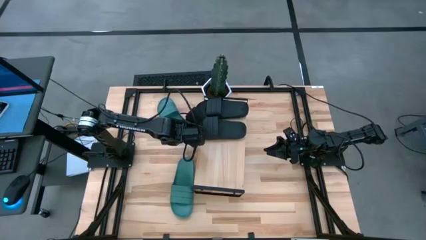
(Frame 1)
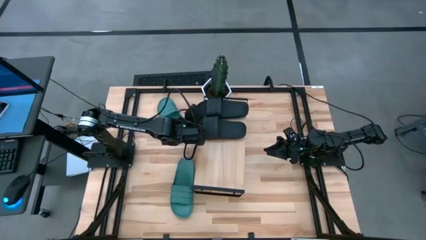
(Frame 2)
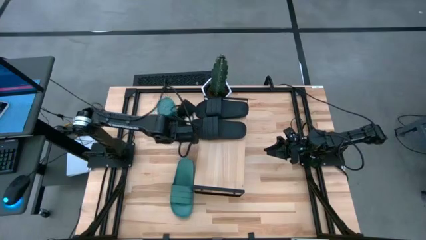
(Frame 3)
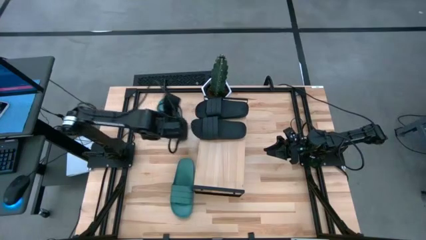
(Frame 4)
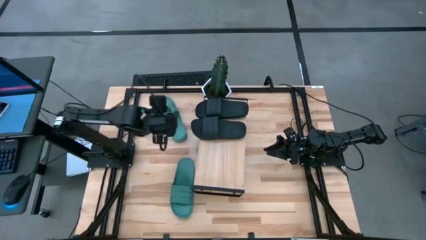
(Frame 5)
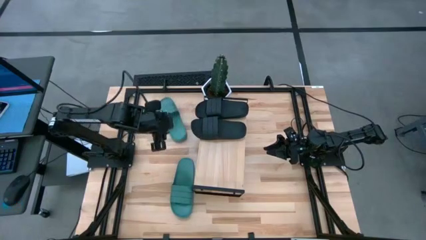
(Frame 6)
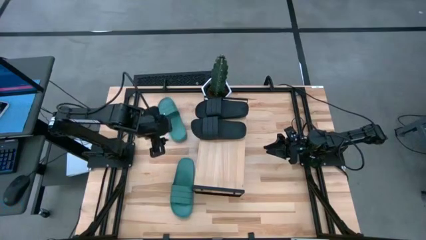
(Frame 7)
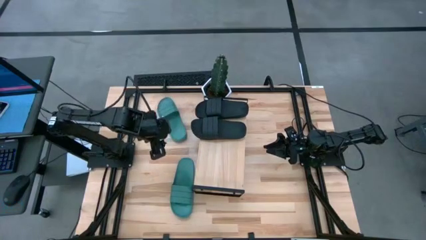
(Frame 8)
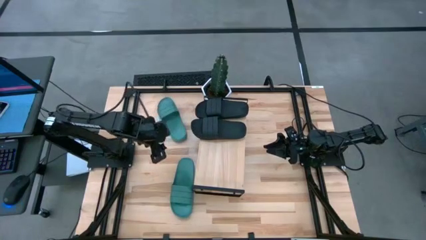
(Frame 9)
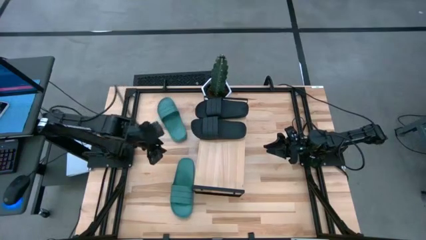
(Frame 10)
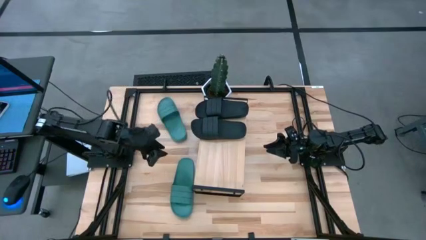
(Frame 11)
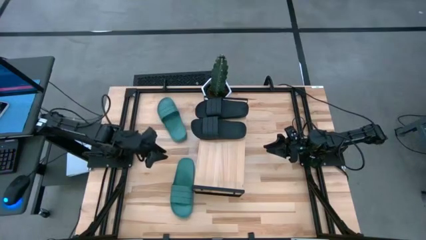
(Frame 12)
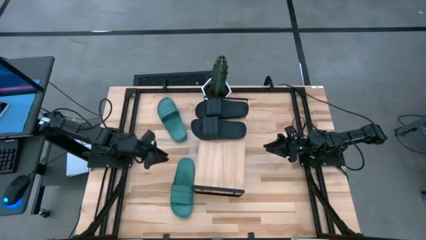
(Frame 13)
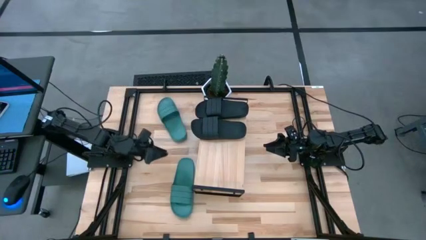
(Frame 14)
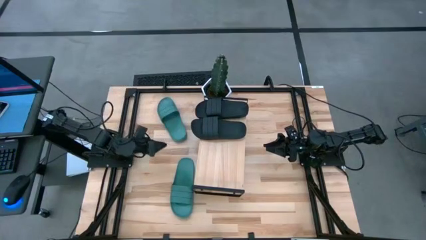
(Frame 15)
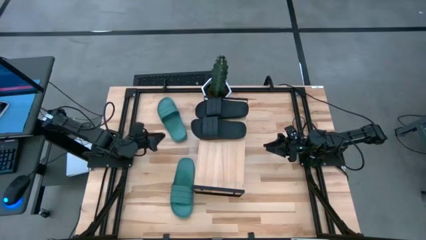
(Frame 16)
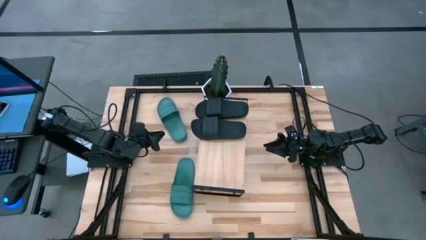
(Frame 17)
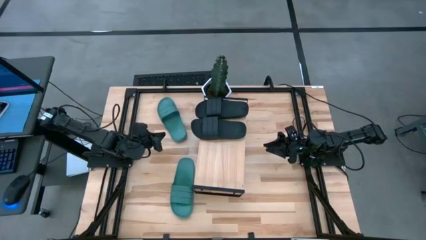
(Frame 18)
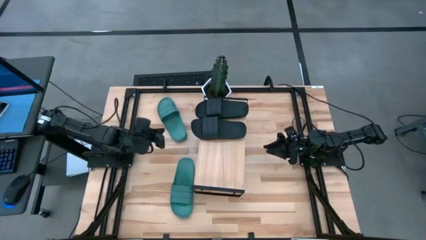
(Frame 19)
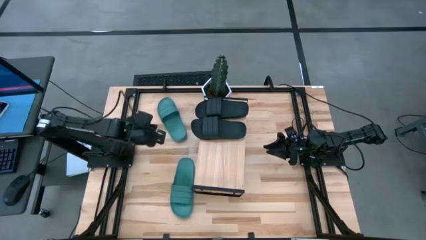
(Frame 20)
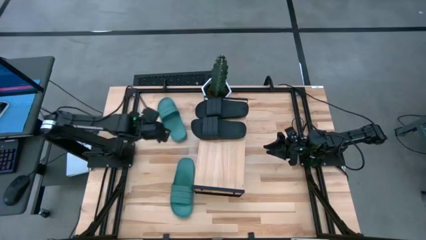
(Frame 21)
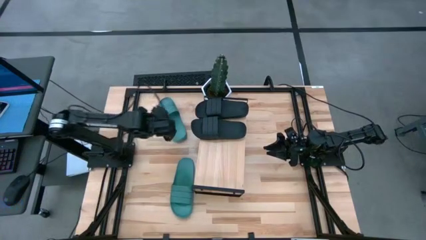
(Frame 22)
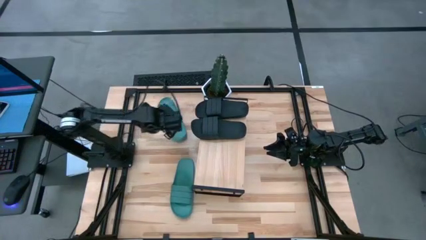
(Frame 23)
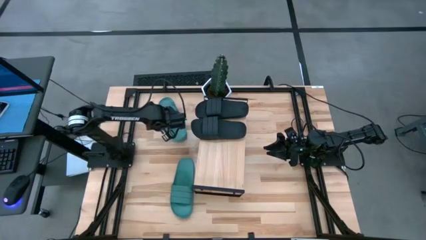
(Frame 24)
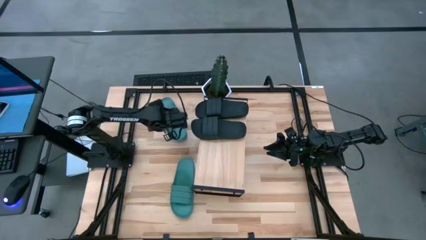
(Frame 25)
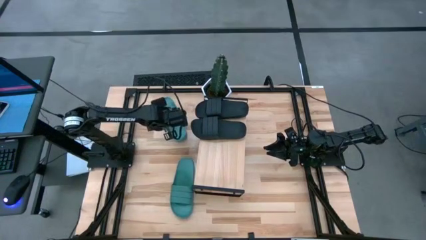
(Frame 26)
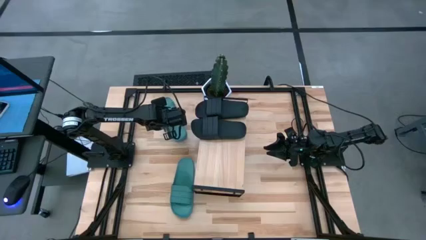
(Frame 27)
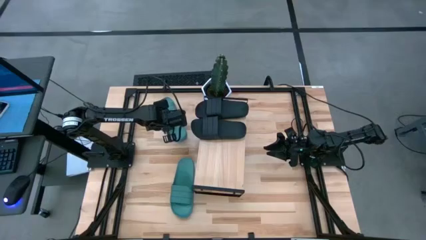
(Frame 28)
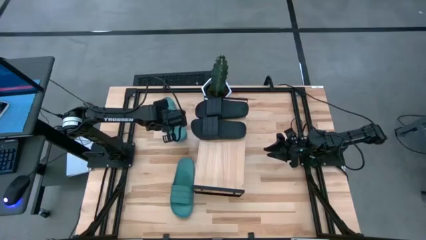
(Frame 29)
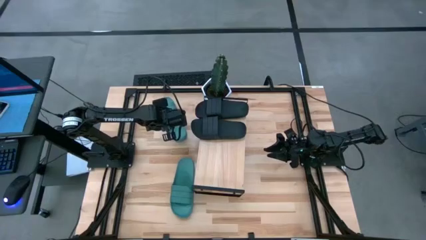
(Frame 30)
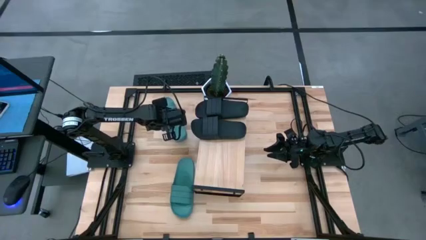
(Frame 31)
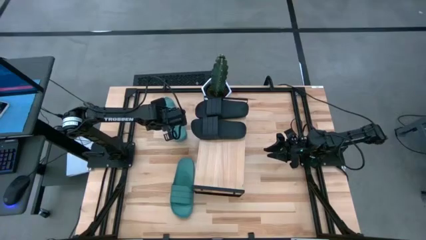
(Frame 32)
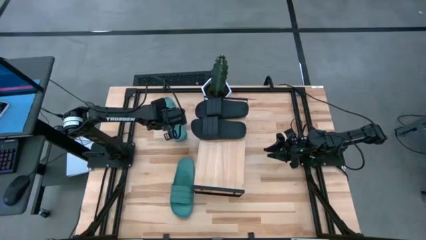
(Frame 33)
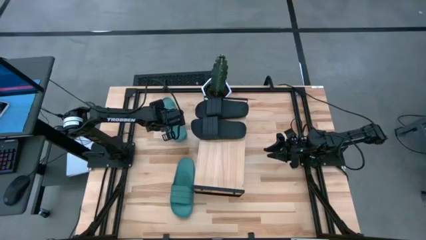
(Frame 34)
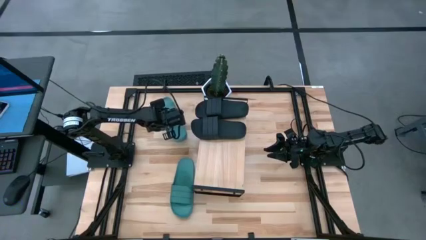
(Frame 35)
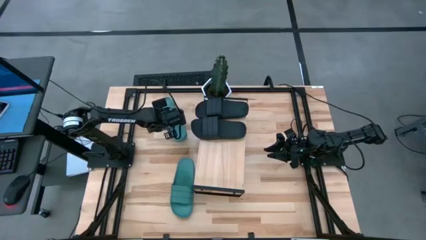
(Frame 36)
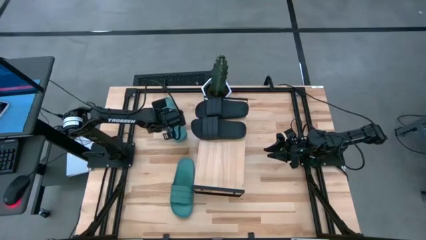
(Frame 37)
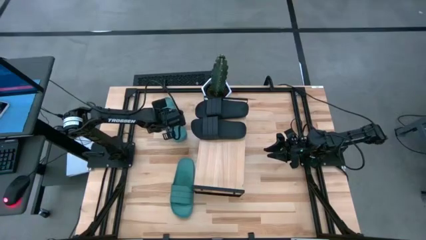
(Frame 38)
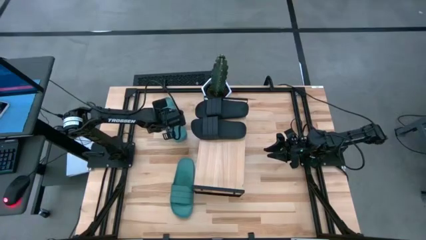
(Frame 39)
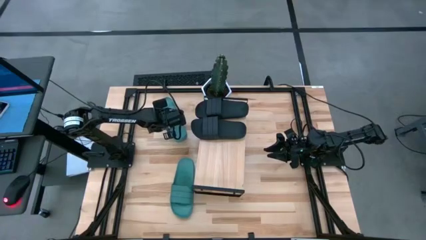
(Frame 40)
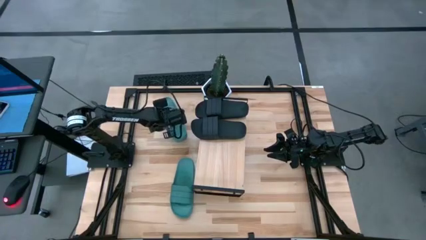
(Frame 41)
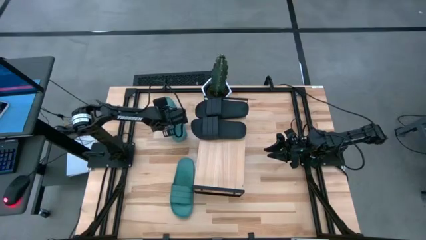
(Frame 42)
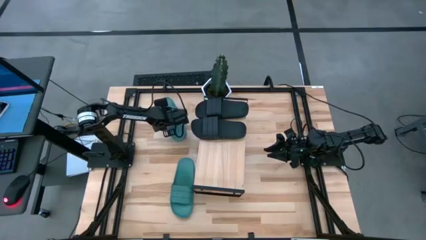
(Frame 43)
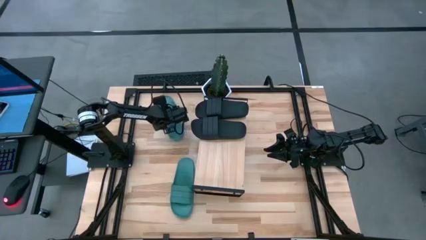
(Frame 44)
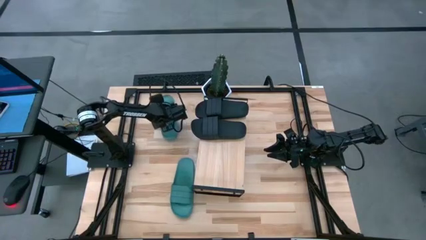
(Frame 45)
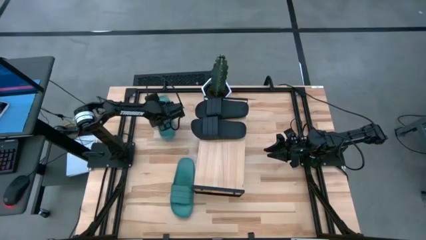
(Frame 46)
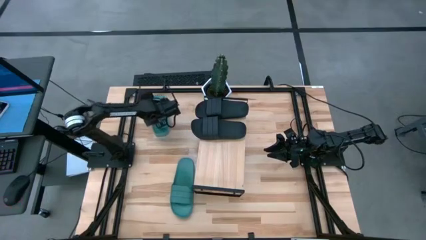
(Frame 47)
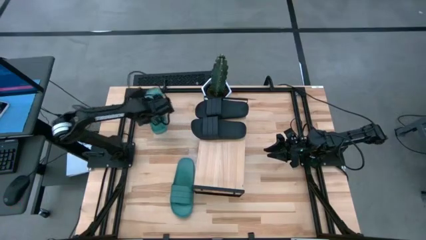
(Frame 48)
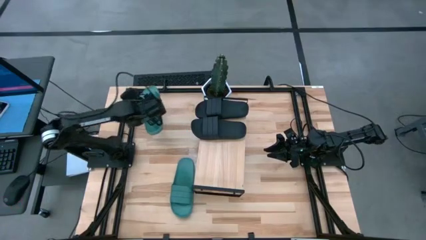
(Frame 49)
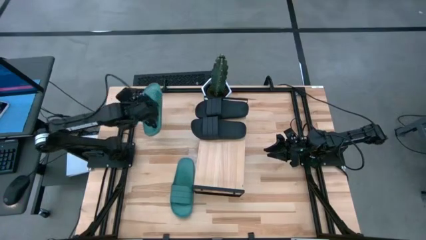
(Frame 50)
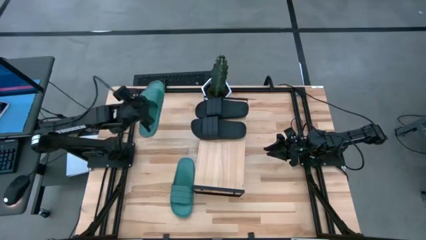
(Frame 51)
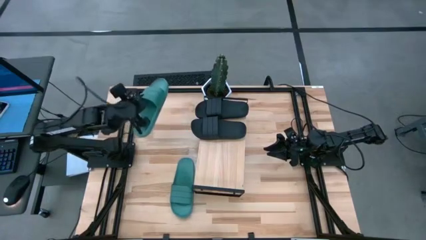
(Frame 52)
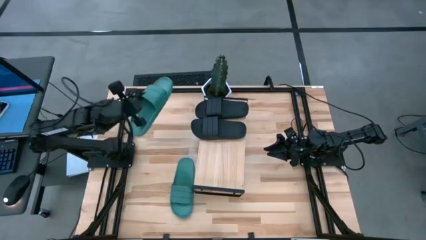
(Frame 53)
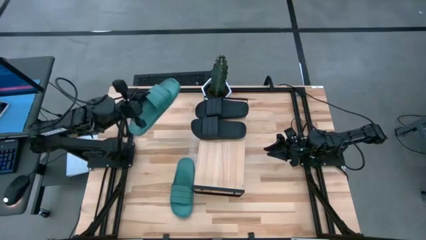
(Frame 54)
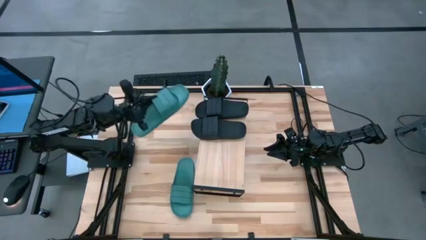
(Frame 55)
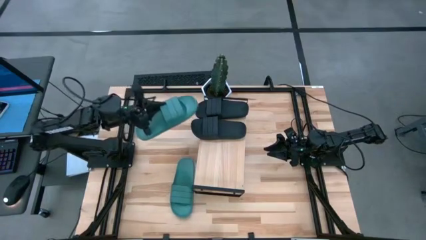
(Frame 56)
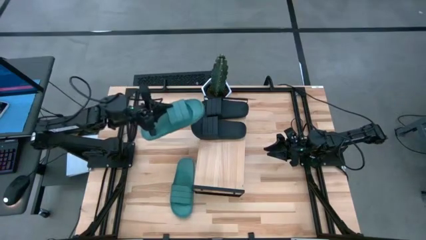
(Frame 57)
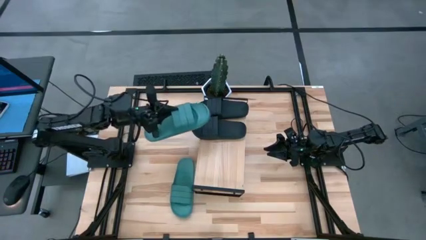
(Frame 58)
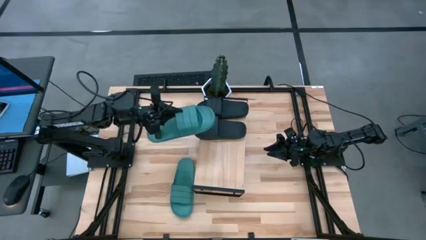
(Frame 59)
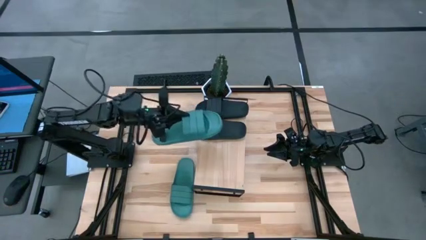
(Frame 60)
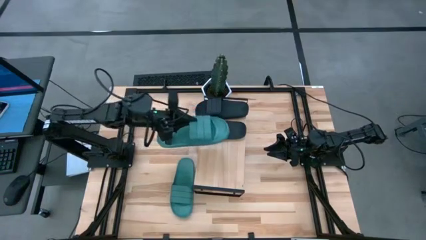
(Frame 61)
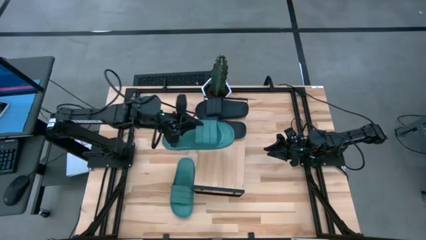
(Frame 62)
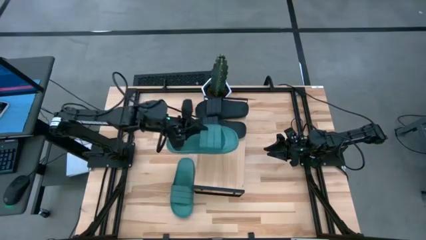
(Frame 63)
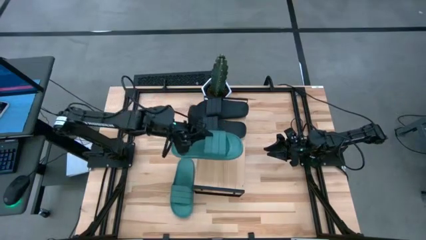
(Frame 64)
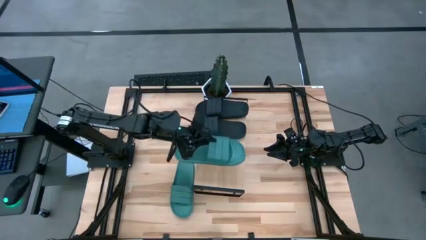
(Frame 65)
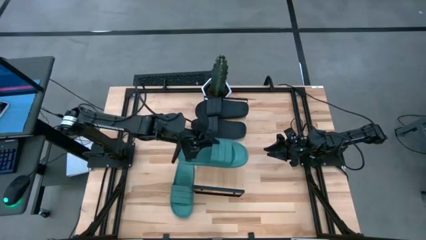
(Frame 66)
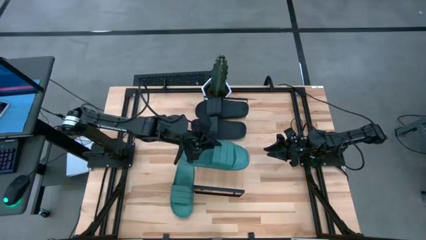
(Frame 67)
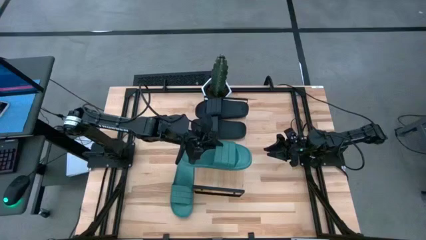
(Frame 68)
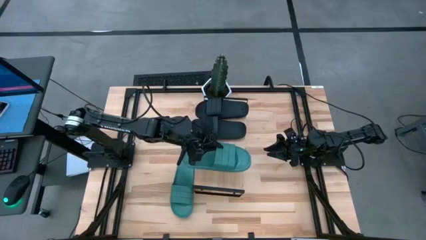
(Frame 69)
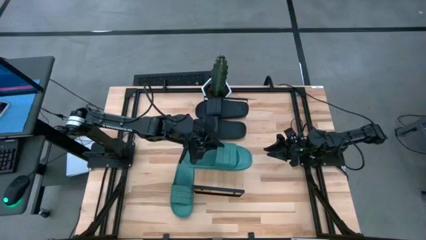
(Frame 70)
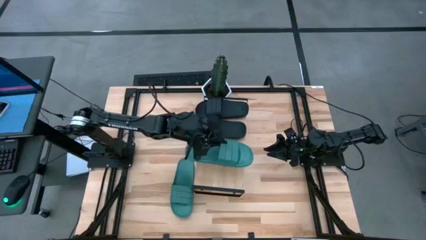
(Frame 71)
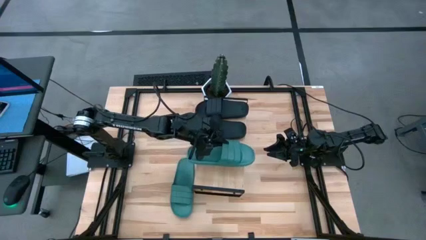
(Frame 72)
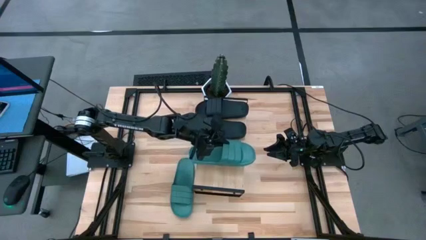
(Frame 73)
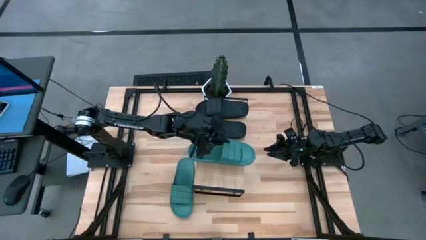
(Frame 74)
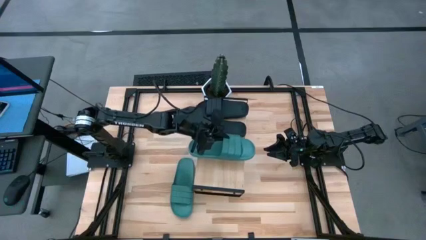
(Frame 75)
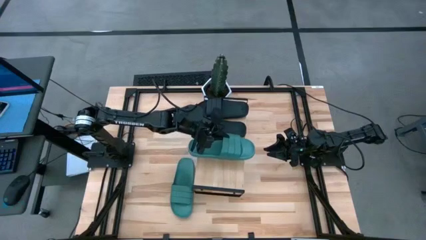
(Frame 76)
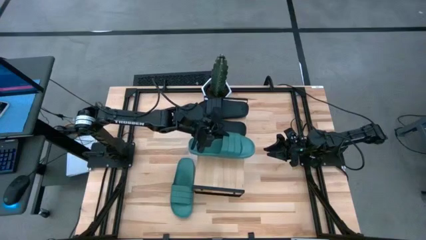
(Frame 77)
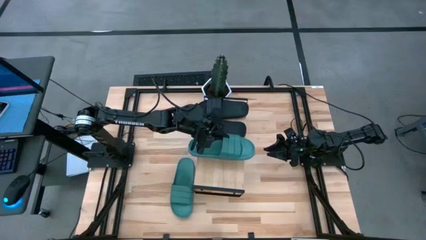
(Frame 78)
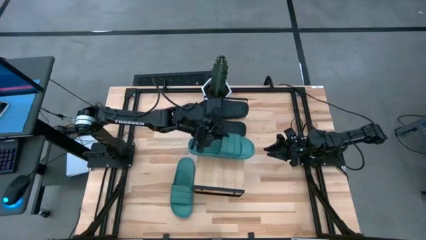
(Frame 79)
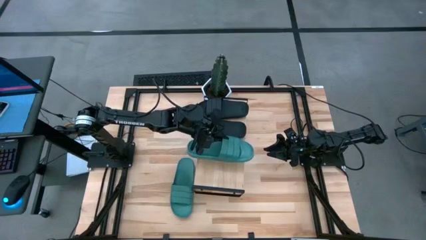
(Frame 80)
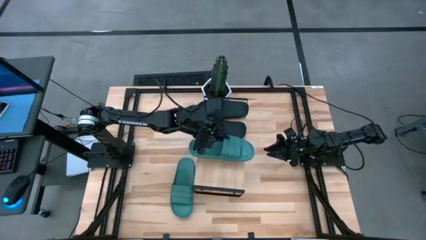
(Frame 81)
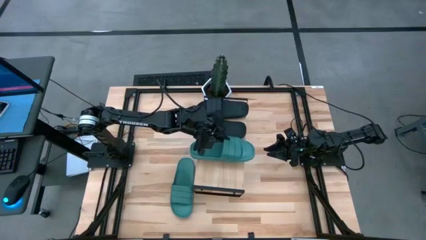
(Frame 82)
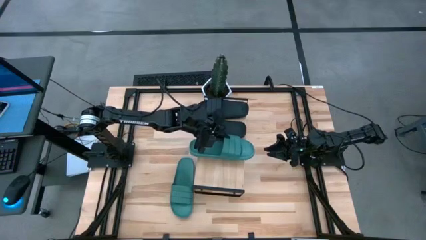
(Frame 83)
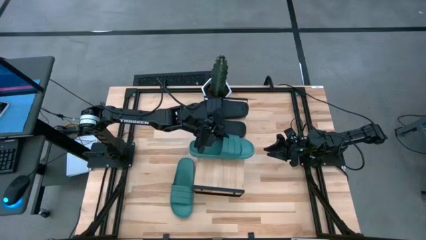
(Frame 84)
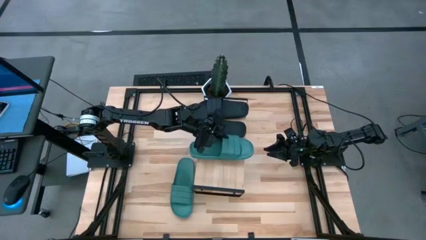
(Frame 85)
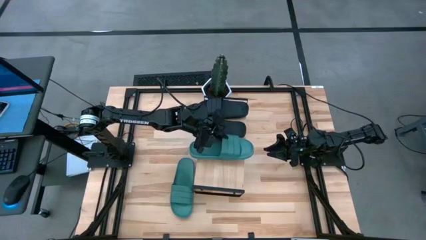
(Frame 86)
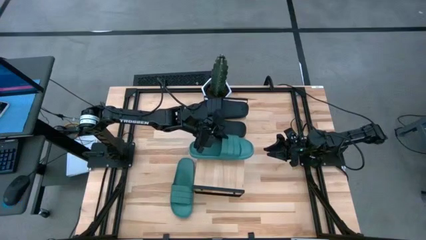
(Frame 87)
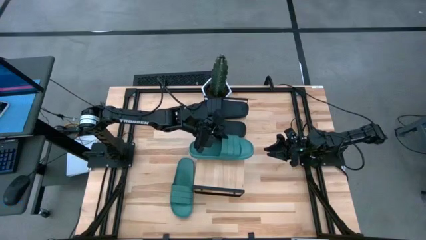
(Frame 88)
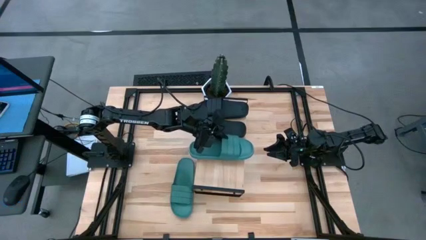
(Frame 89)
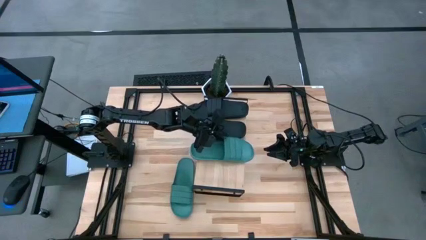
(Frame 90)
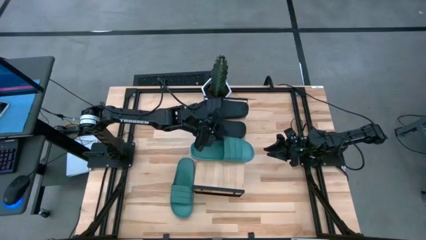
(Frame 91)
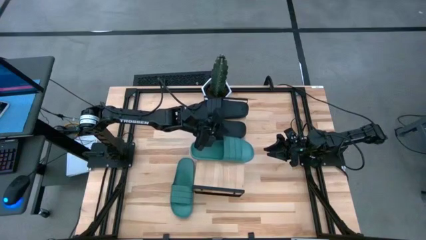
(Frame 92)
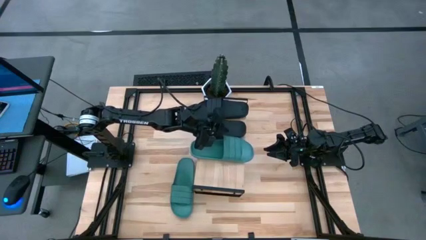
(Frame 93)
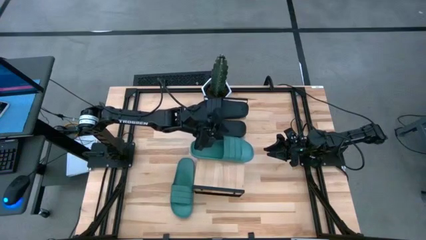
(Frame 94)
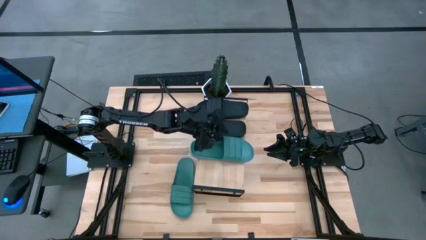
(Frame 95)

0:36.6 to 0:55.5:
Task: Pick and place slides into the shelf
Put the top green slipper on the shelf
